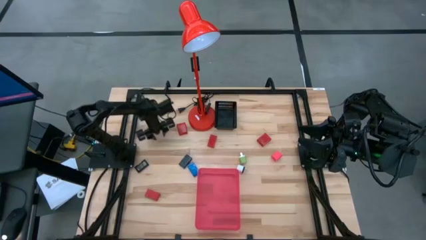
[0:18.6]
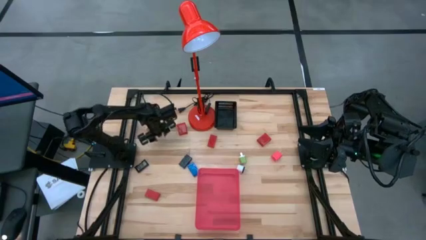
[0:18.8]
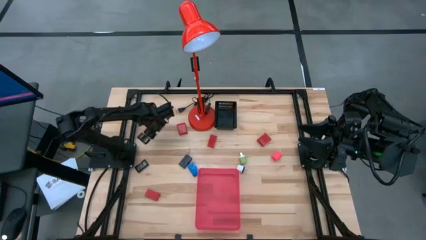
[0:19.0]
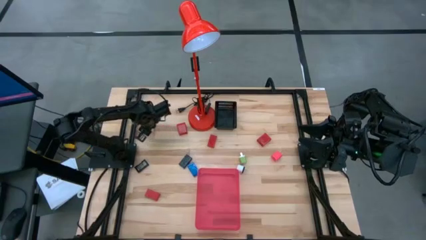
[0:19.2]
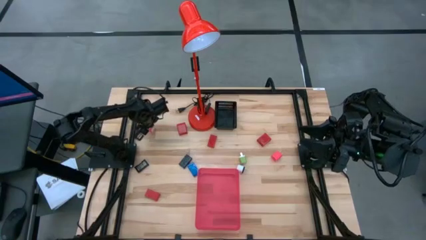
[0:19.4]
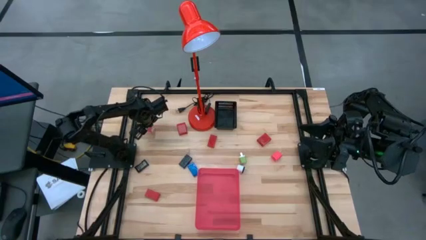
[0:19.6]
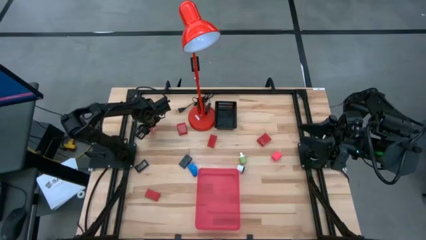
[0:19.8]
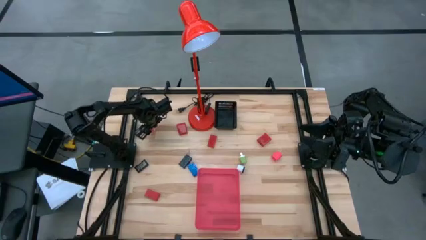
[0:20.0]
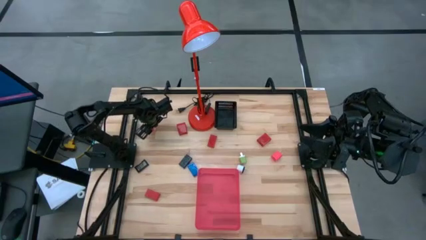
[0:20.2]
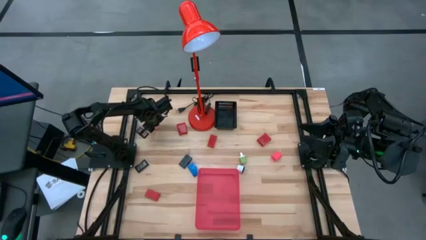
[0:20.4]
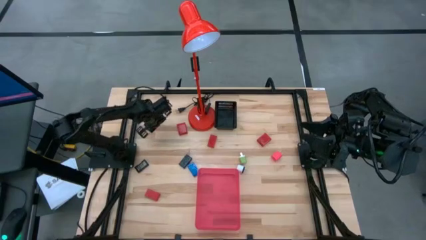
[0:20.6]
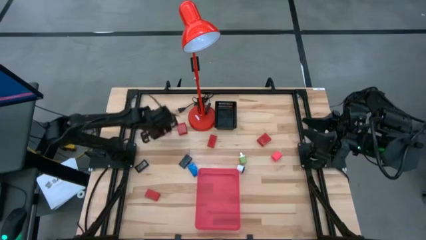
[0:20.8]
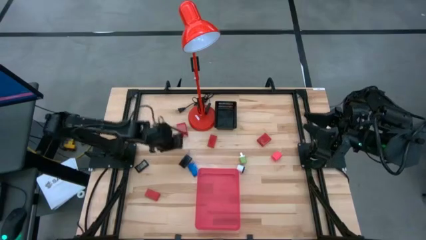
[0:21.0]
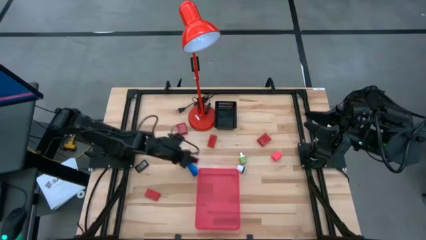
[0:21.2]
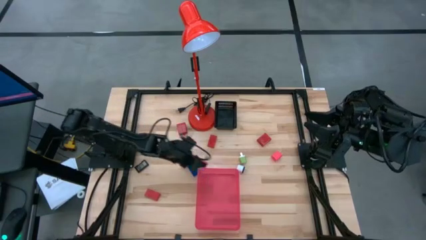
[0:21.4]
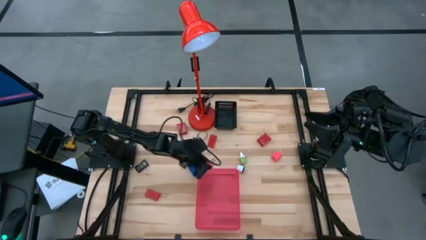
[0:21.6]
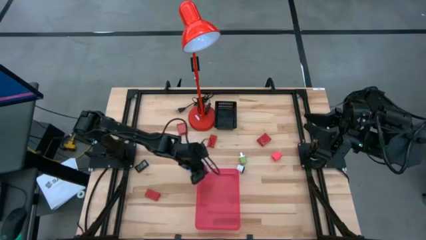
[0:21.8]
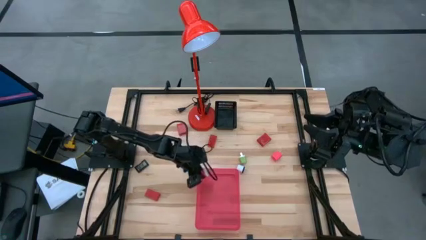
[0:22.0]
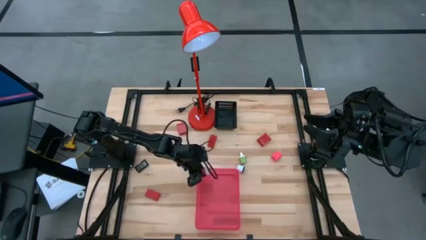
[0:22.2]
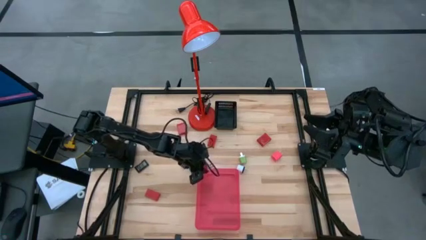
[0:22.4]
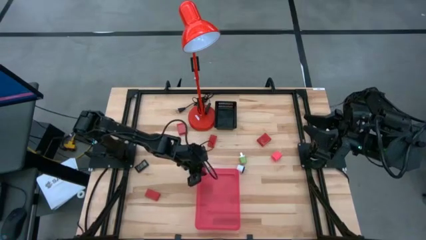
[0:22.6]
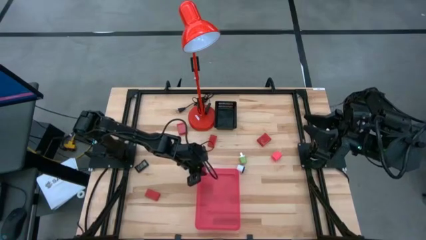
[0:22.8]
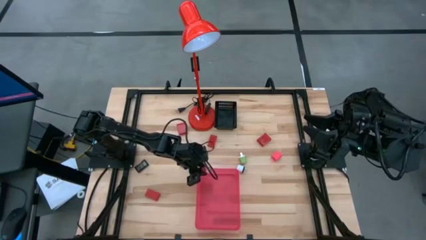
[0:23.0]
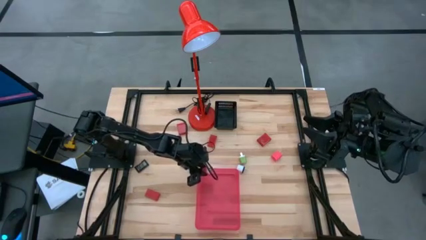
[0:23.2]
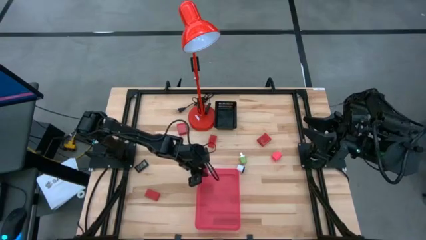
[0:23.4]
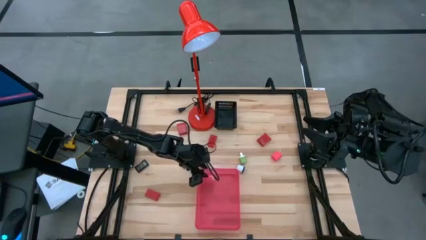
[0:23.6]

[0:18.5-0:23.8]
Task: Pick & Place Office items
Put the left pink charger adapter into the red bin

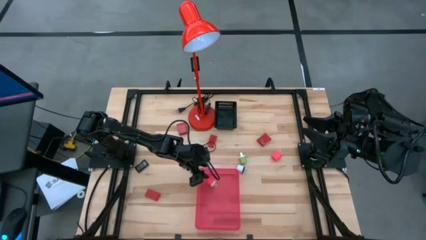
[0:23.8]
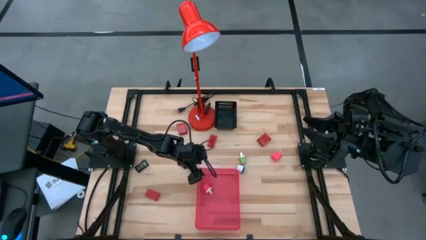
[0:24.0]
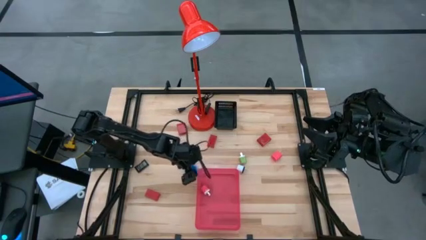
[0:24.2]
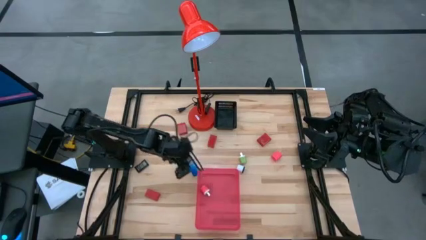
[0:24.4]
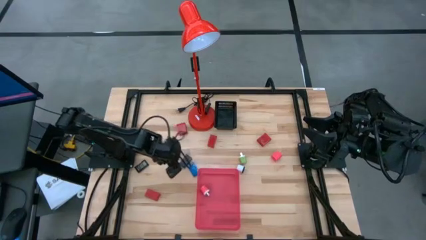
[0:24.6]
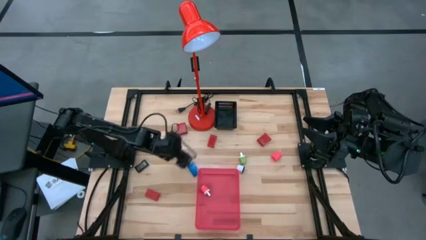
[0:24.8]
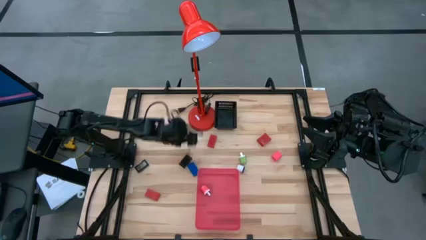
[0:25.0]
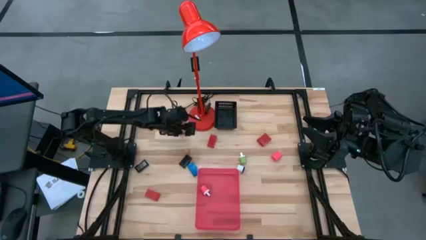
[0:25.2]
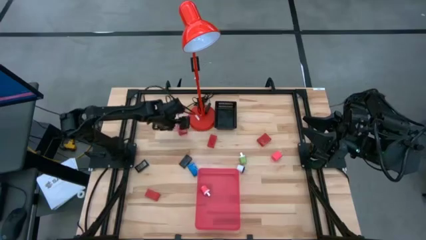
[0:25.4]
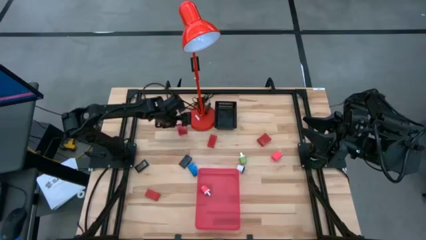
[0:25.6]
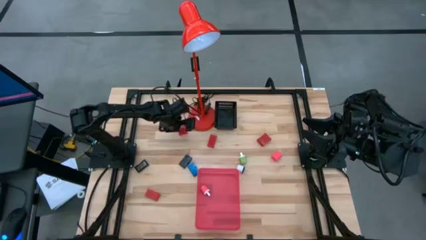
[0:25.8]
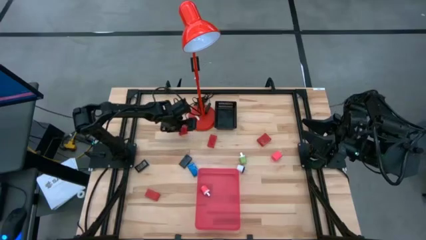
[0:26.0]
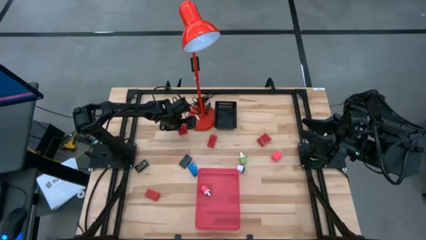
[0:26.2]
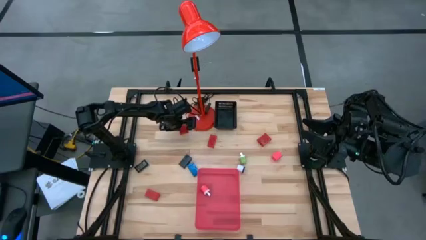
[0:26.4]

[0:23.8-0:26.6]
Put the left red charger adapter into the red bin

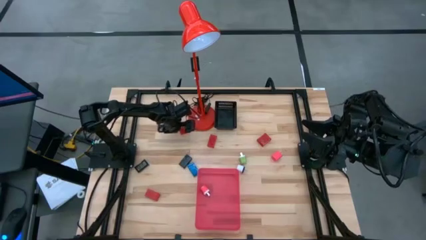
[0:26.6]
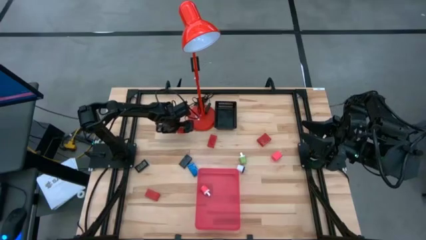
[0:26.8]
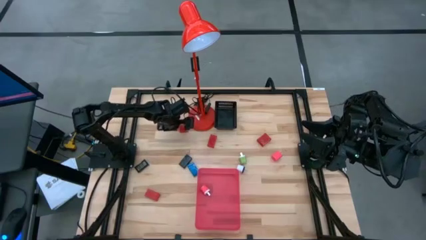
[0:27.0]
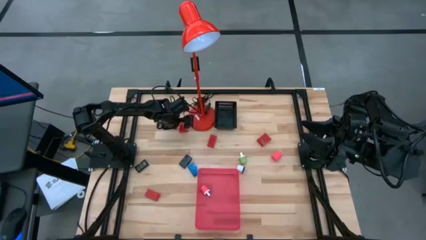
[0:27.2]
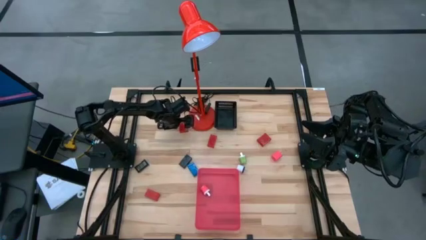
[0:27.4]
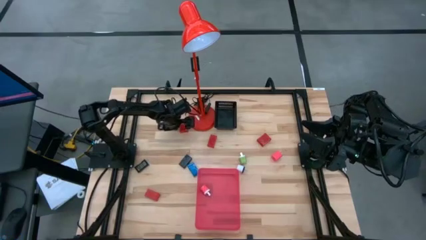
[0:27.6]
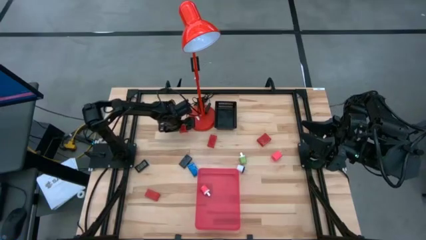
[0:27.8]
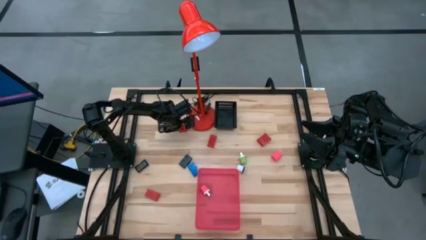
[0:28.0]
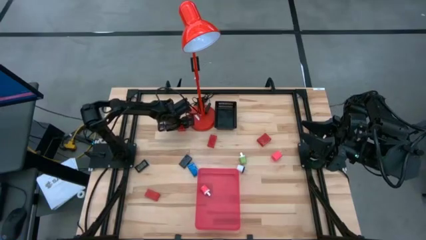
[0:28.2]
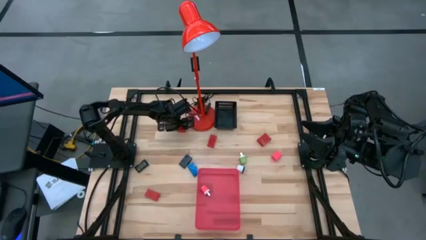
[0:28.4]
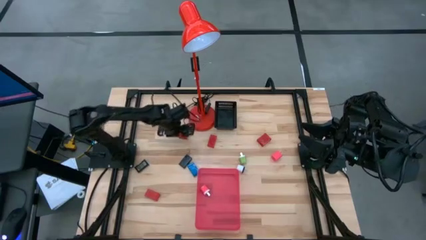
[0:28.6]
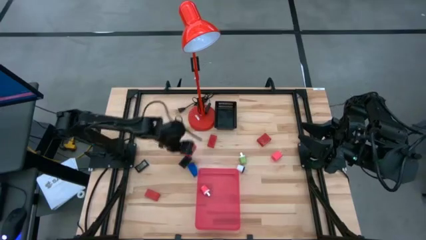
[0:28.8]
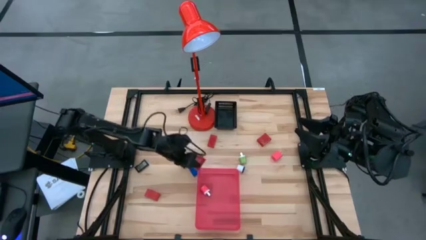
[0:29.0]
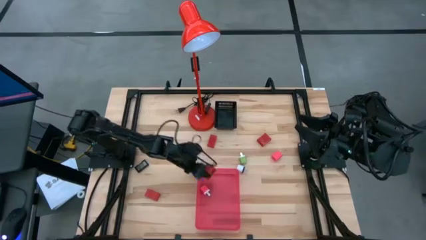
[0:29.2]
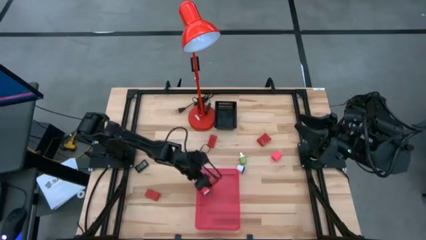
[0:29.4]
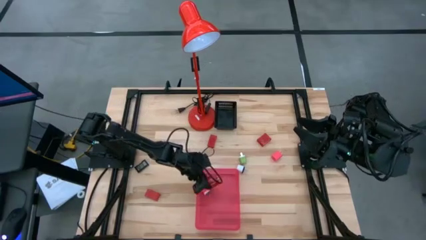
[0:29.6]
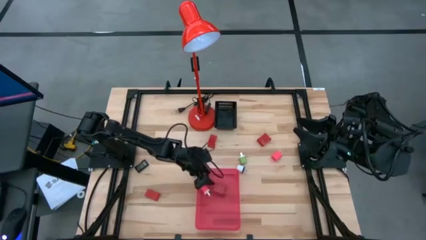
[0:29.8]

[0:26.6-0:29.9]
Put the left red charger adapter into the red bin

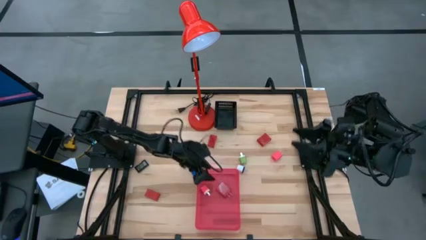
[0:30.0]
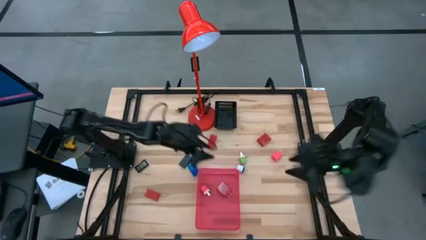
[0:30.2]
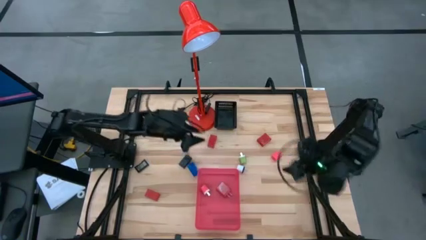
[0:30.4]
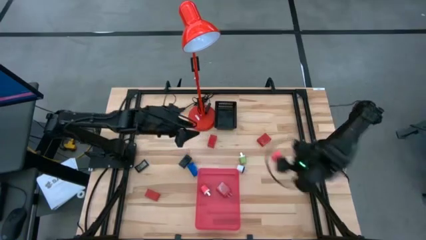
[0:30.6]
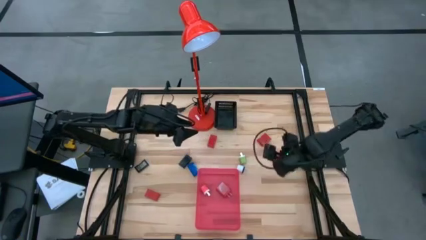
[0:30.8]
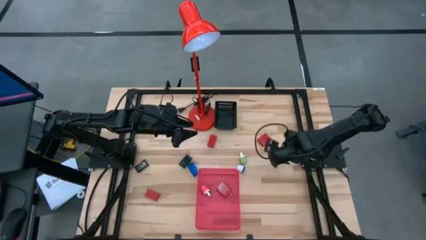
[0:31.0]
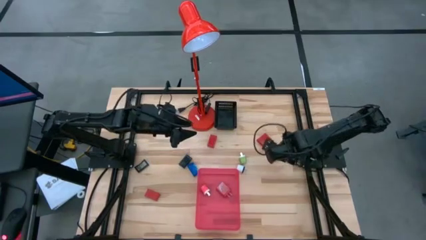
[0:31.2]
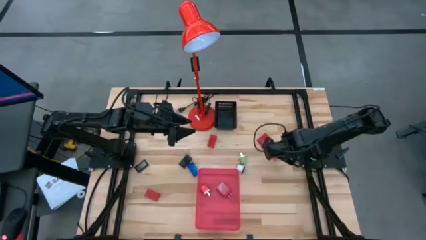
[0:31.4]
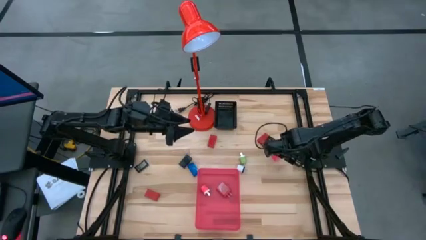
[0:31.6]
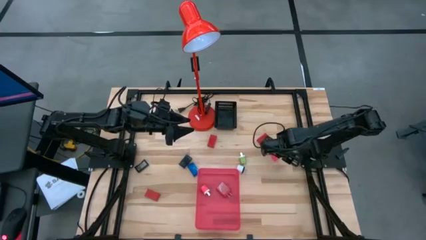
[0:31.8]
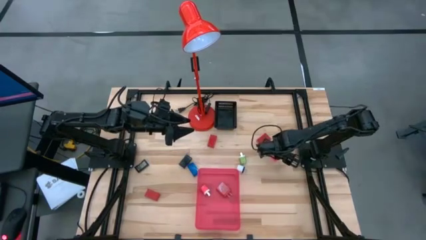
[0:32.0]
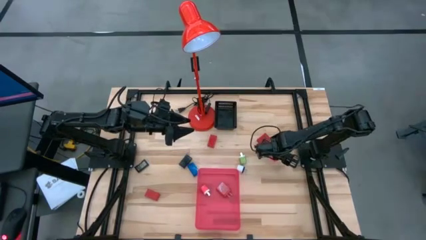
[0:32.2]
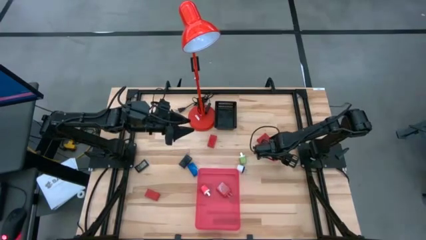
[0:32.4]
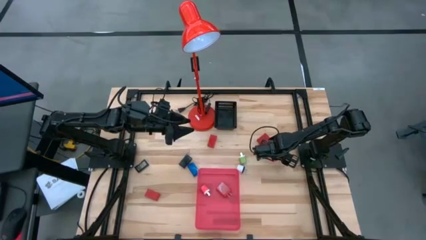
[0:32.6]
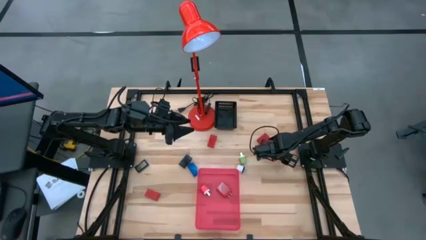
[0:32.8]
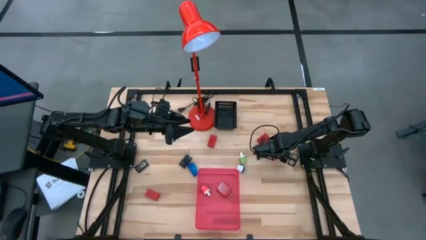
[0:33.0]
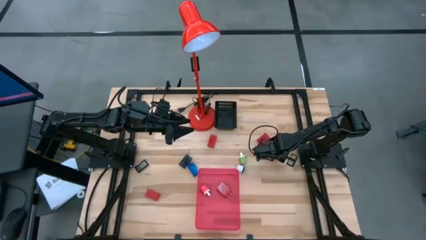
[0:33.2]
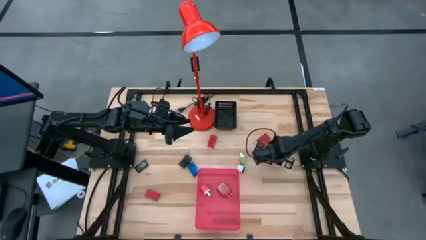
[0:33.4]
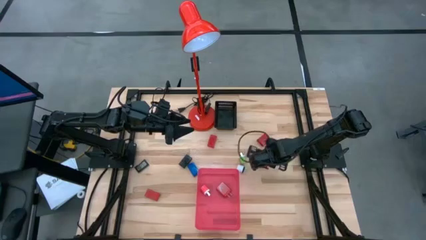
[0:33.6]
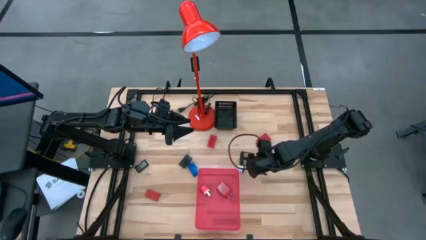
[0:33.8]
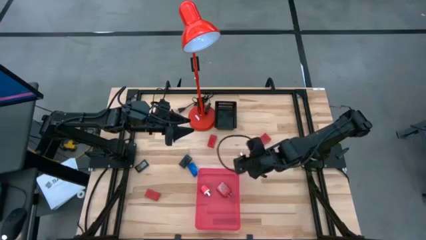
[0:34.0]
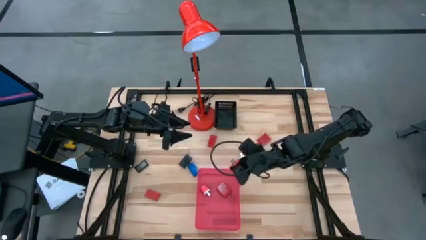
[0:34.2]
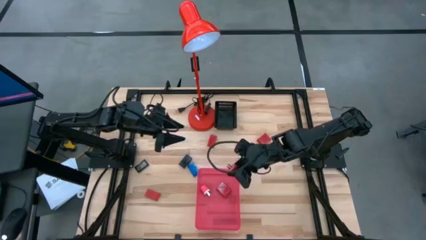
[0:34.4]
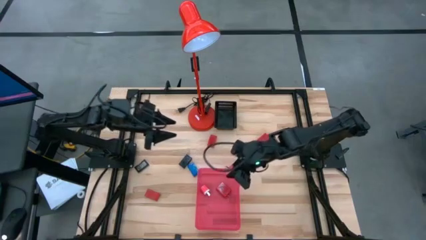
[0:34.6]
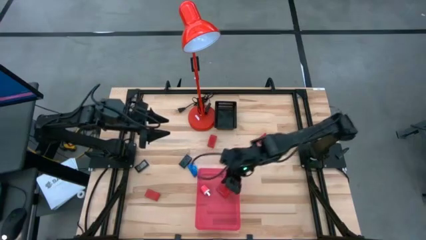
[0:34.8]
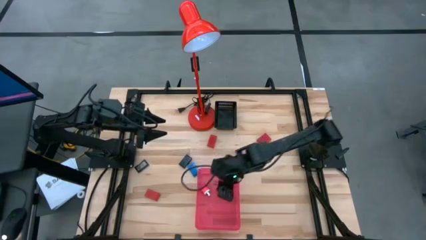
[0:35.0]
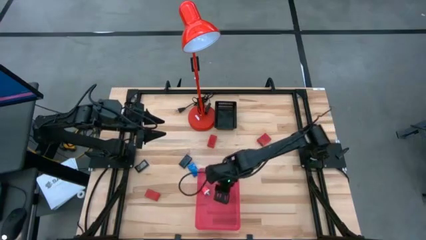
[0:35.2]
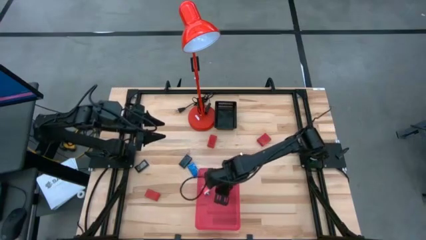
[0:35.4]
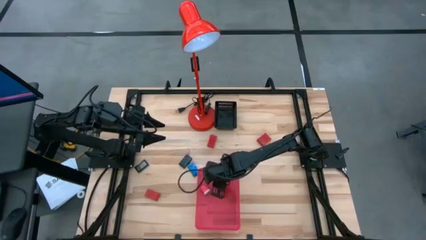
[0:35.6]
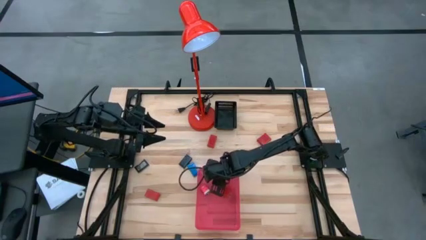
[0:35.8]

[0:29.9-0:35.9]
Put the pink charger adapter into the red bin
